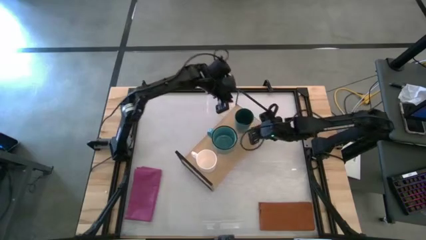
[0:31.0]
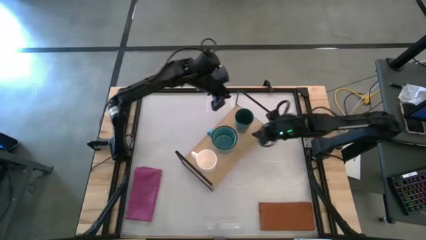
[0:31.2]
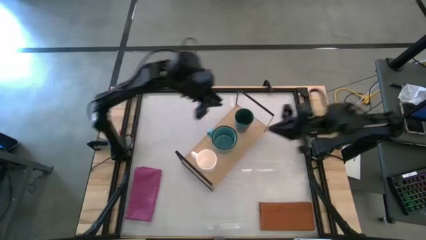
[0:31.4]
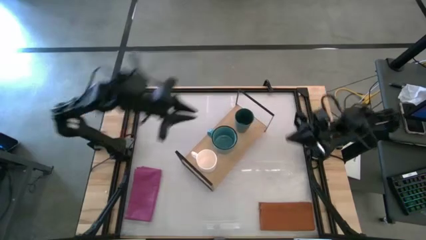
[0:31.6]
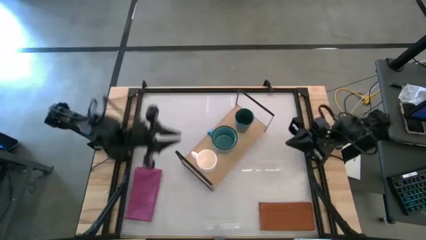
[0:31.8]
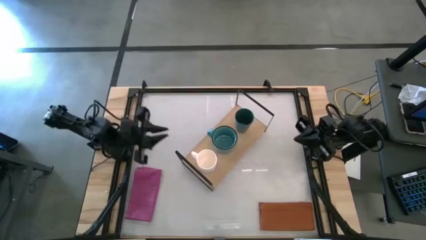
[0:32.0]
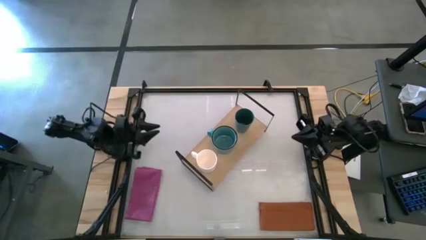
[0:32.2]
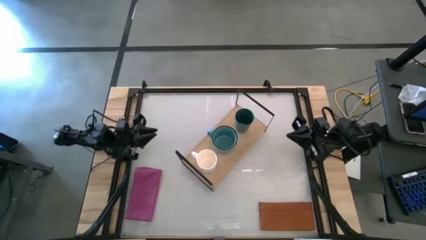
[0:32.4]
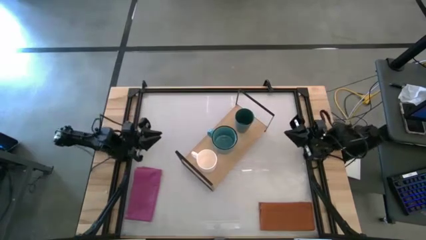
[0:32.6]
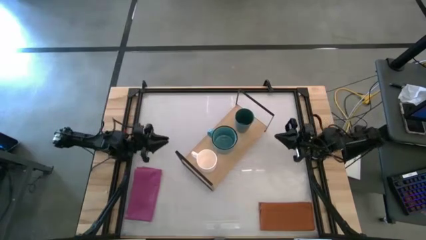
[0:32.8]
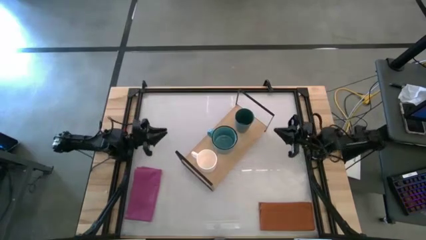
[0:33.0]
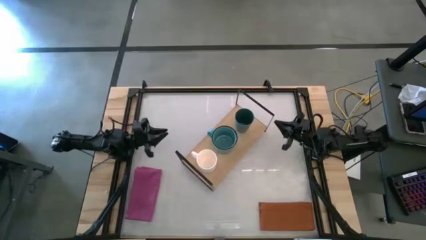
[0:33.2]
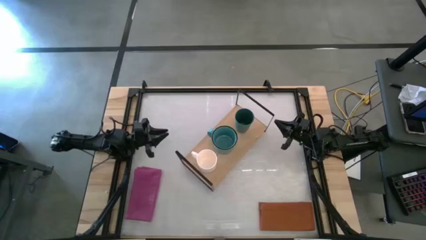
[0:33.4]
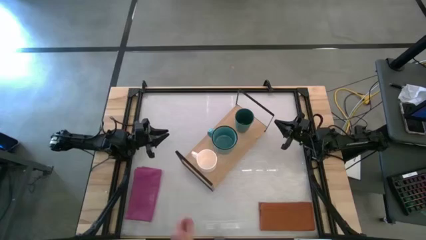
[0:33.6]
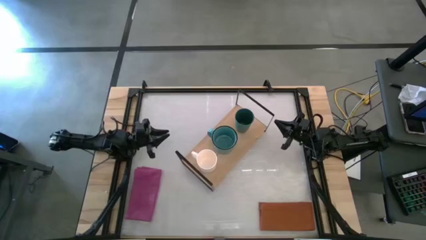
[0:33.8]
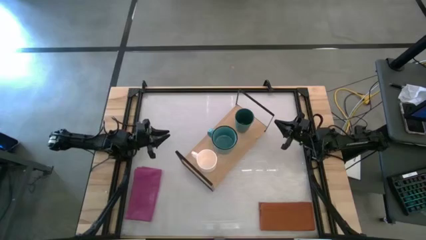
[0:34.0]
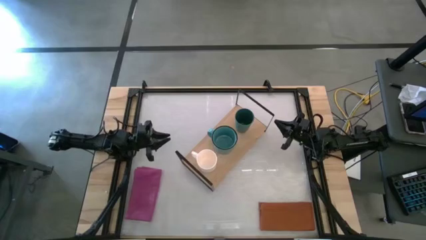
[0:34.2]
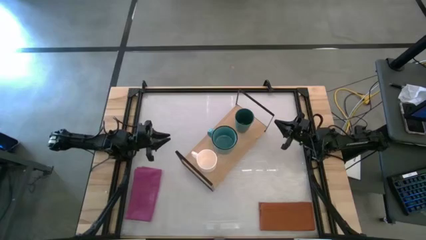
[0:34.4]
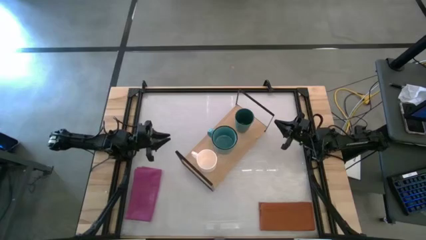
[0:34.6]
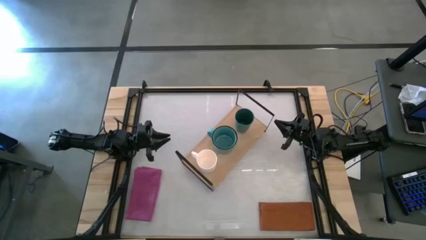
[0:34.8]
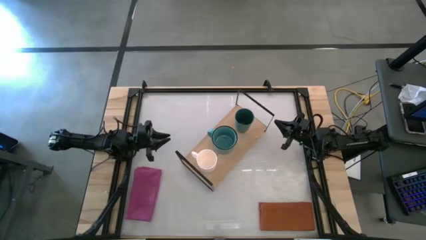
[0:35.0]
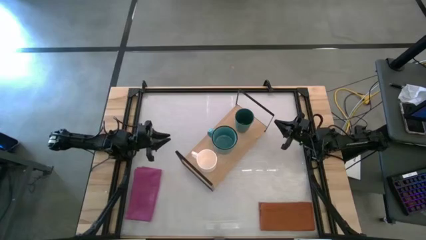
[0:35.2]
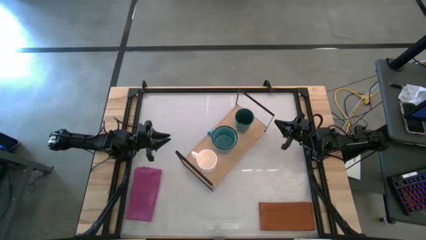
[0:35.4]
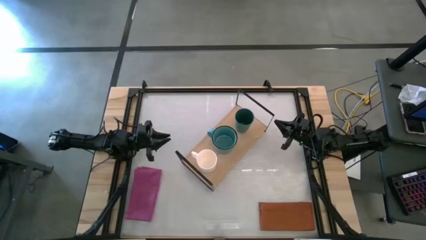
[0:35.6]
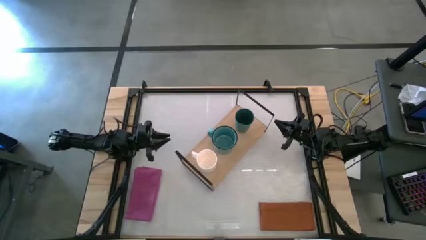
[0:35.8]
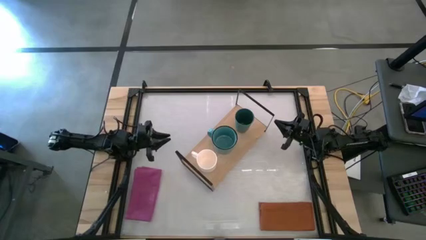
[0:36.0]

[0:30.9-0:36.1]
Task: Stack small to large cups/mugs on shelf
Return to Home Position

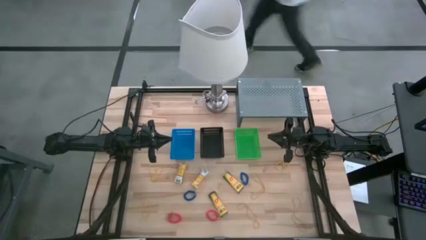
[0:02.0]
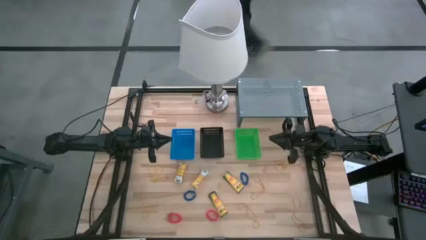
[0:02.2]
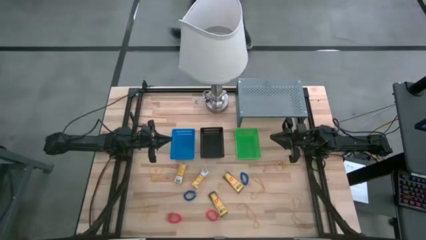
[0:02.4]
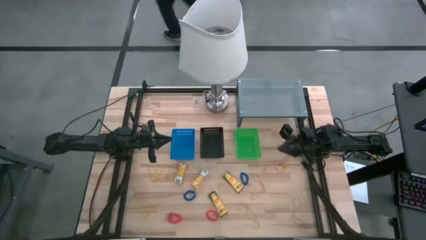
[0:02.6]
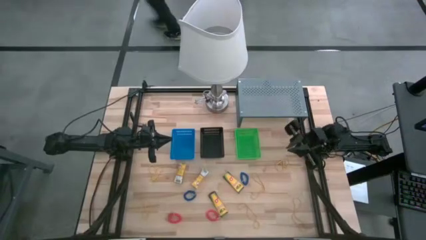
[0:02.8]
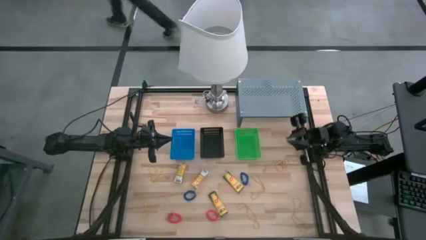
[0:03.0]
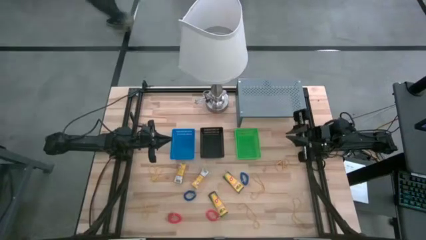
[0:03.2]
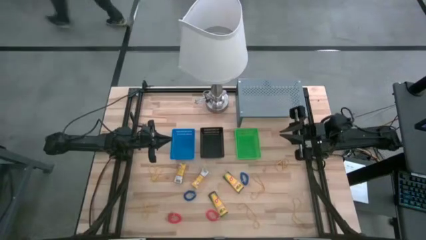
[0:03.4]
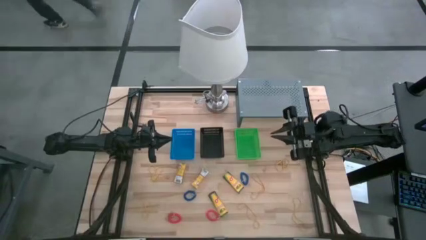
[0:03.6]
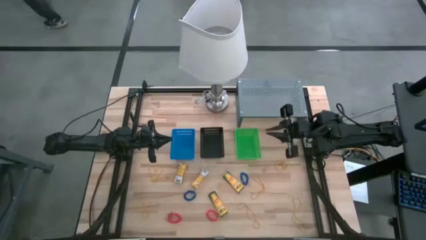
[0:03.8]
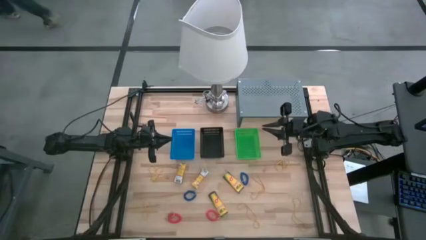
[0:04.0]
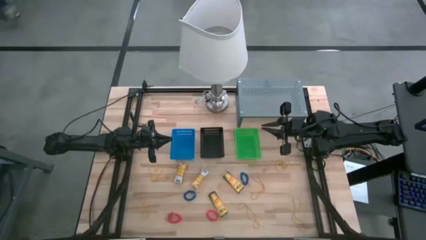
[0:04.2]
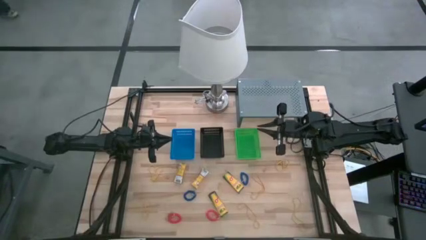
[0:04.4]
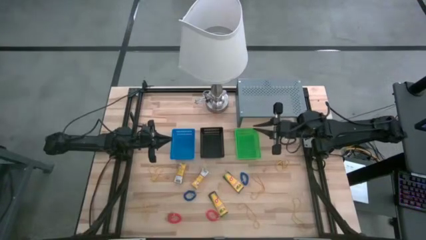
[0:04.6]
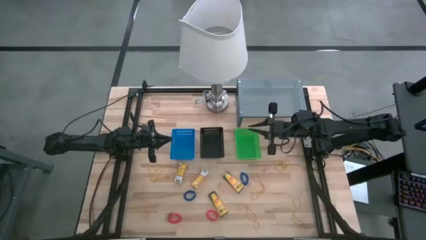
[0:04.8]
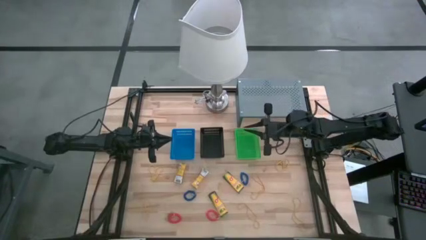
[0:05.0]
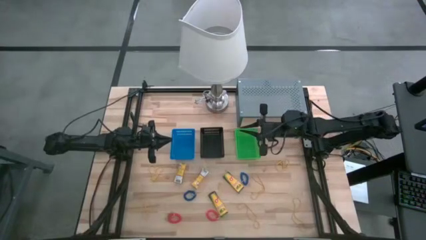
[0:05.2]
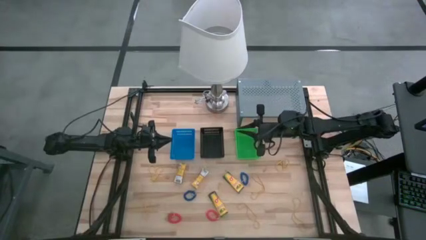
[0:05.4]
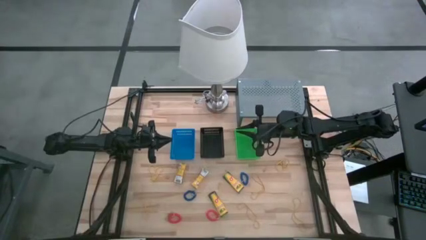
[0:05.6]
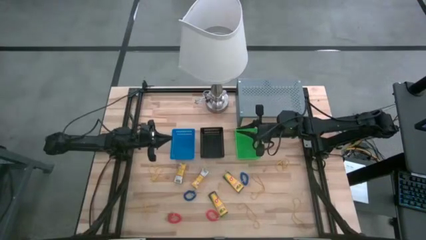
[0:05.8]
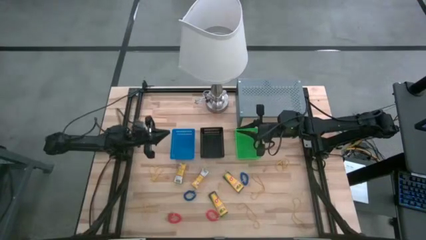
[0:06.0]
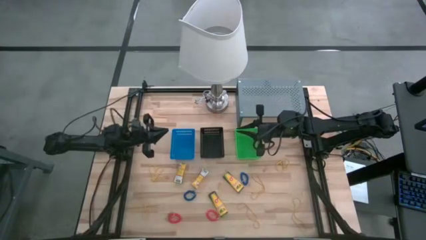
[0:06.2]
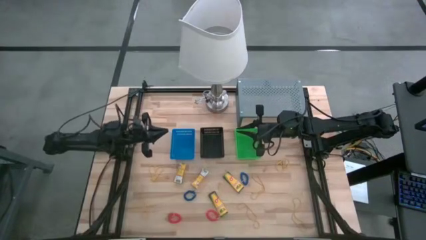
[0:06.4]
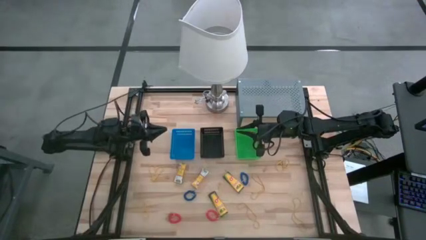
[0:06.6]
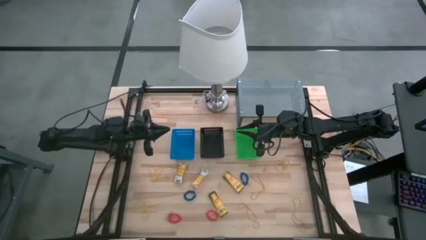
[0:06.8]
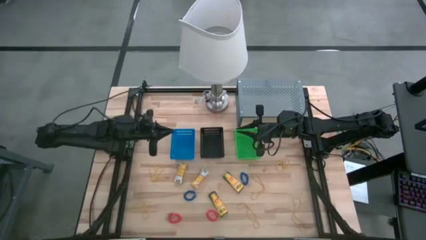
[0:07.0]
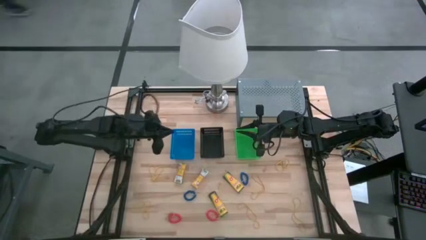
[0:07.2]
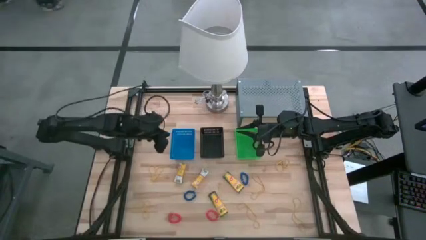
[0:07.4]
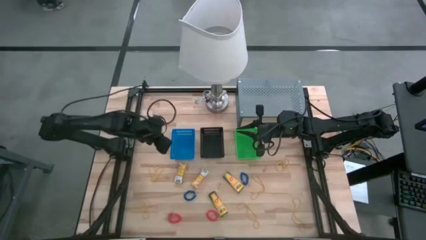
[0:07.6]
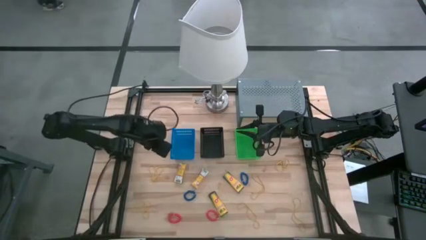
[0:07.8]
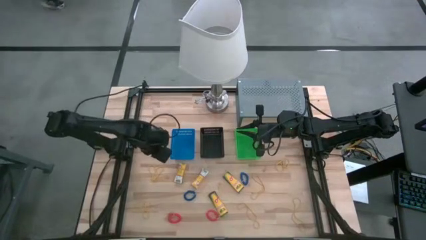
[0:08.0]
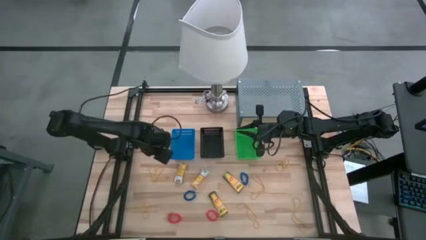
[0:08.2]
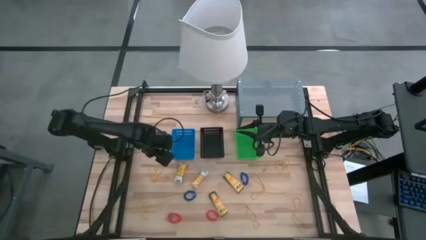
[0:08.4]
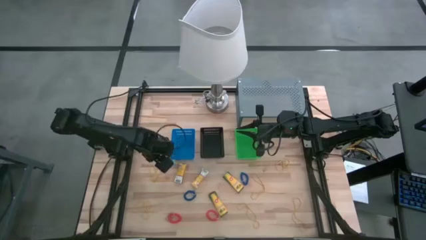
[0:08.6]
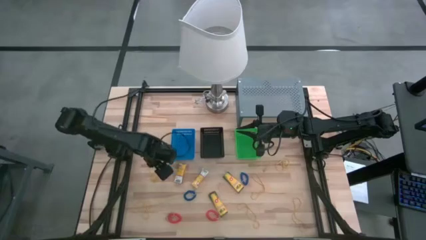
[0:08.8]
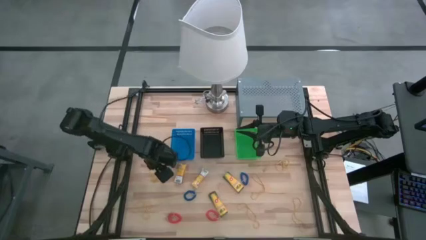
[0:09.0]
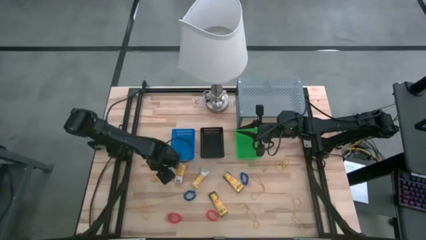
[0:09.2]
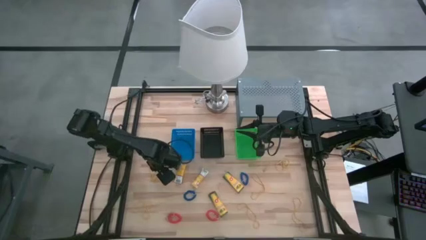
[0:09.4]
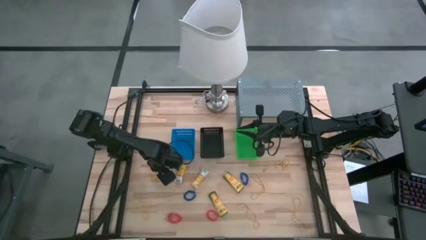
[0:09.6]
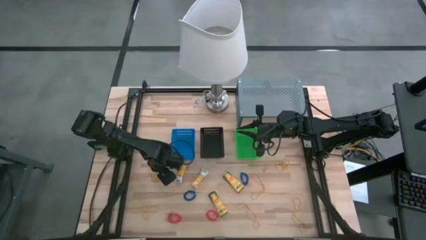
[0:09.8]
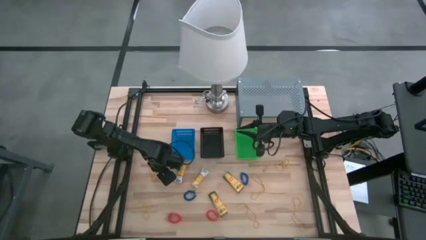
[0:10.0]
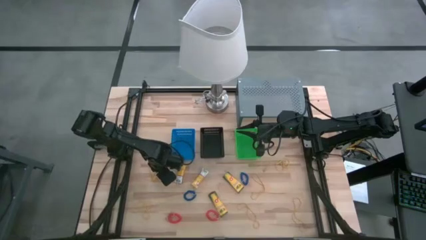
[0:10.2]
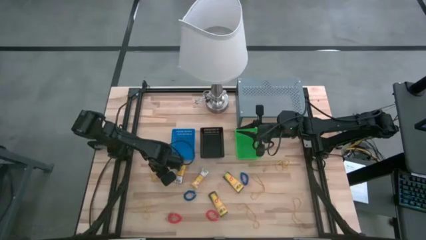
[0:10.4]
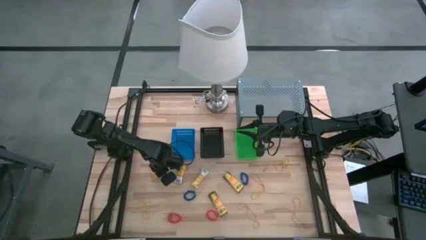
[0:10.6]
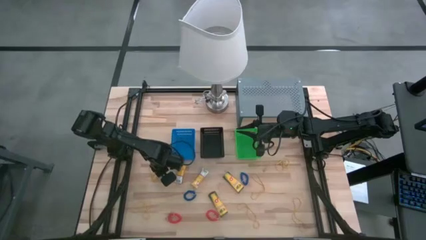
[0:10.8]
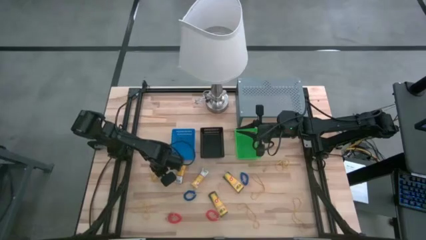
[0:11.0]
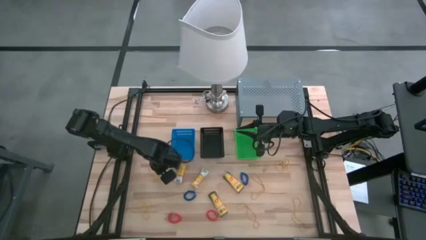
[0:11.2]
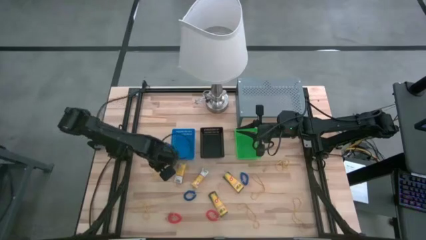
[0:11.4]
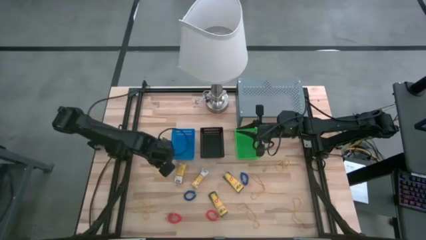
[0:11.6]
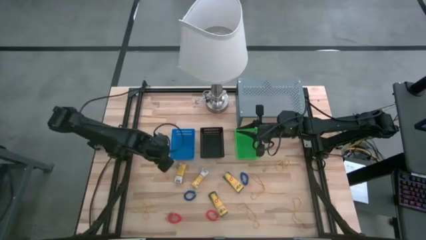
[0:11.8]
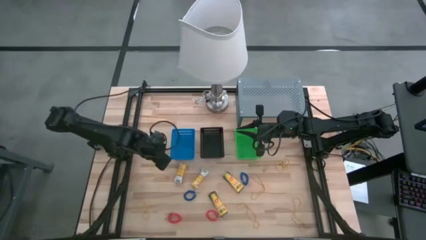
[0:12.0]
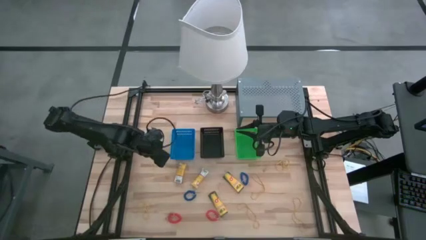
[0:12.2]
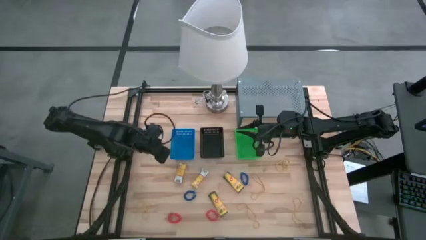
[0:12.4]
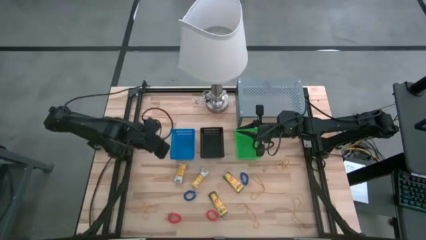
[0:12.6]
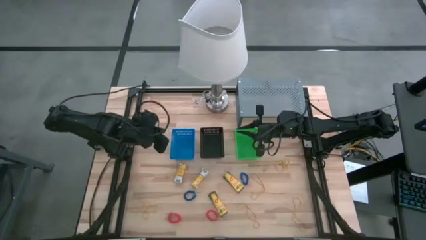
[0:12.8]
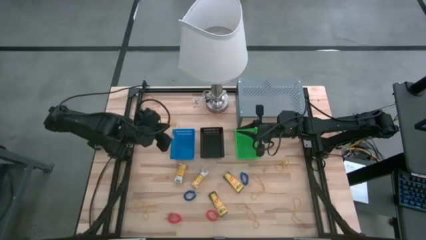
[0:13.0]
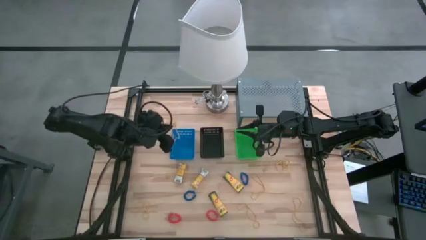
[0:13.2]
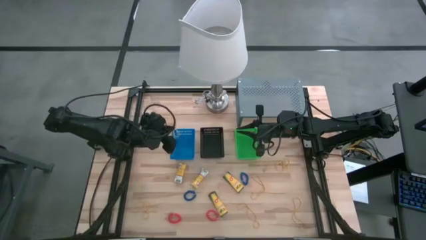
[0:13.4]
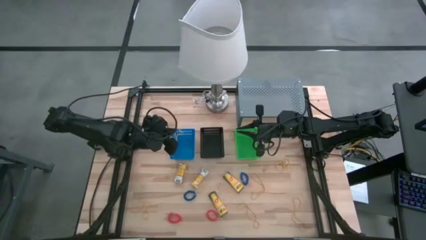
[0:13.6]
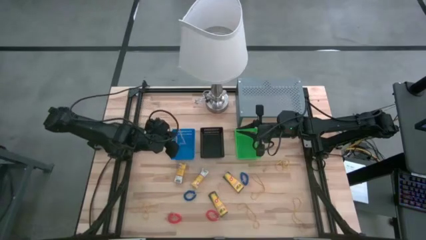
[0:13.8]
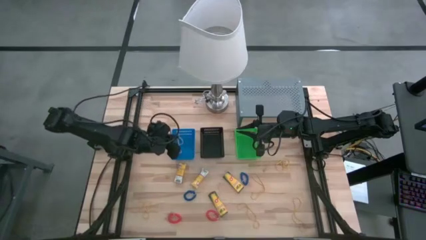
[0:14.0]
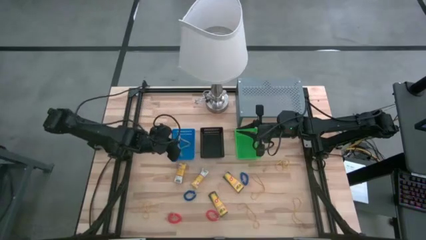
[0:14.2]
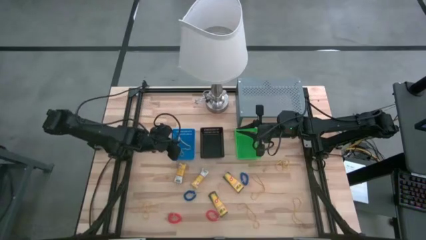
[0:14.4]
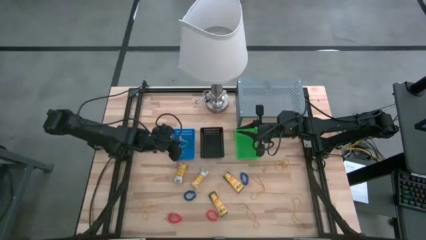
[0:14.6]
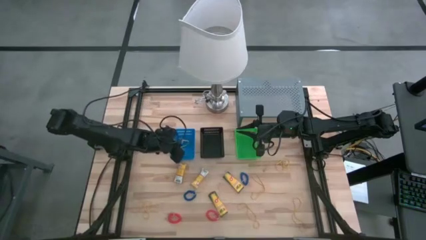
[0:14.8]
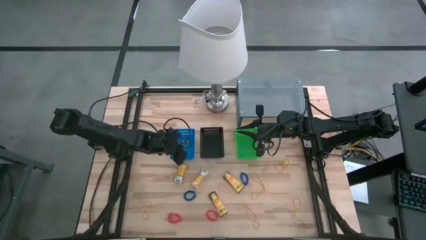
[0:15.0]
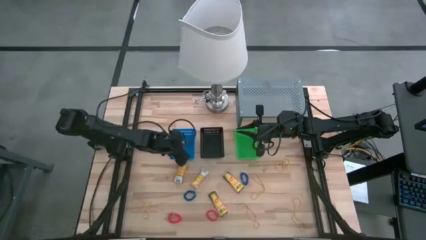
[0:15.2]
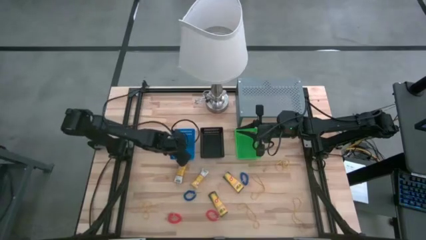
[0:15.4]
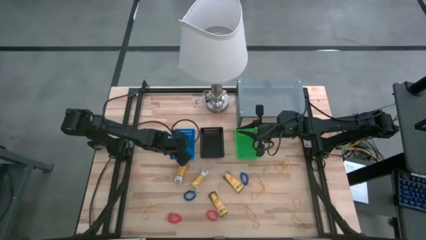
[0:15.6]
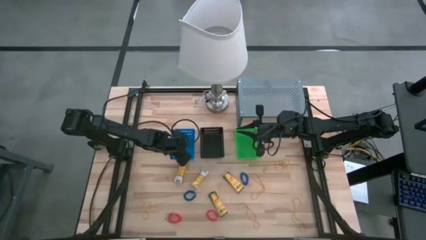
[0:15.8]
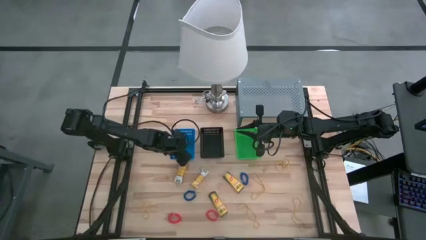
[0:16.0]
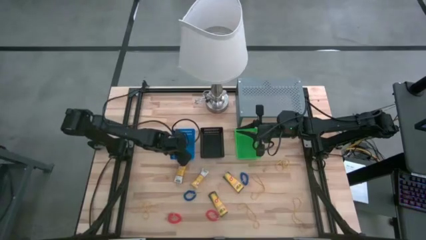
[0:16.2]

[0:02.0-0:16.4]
Task: Pick & Place Office Desk Supplies
Put the yellow rubber band into the blue bin
